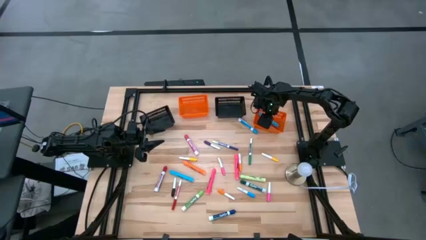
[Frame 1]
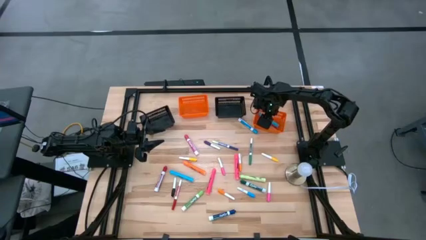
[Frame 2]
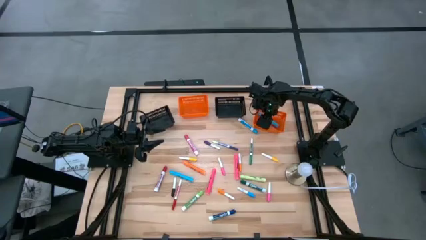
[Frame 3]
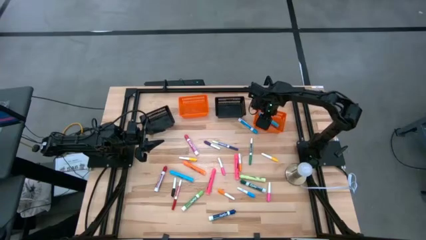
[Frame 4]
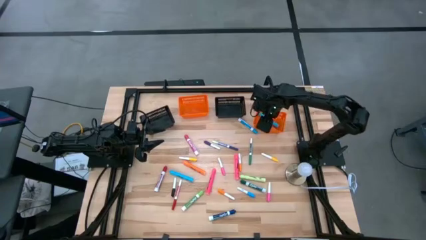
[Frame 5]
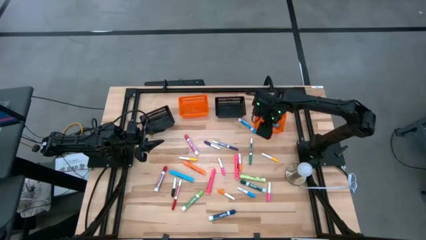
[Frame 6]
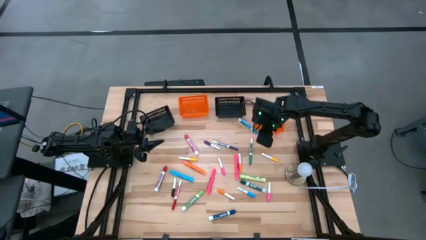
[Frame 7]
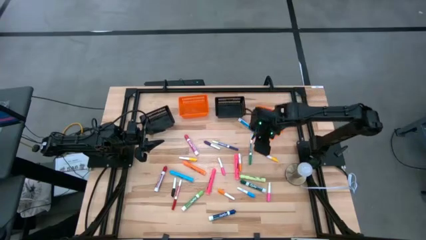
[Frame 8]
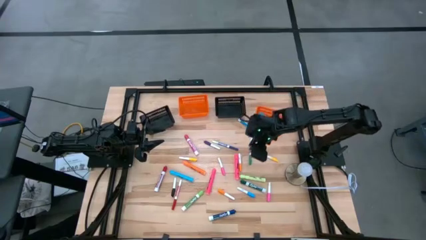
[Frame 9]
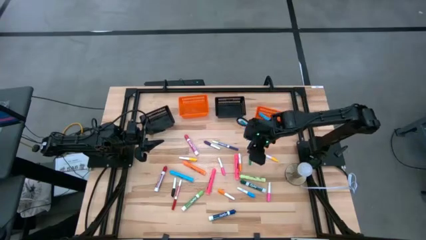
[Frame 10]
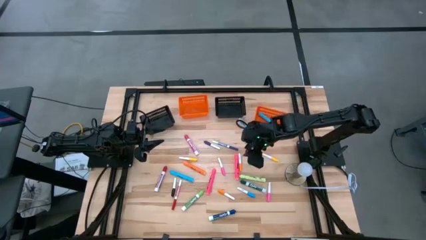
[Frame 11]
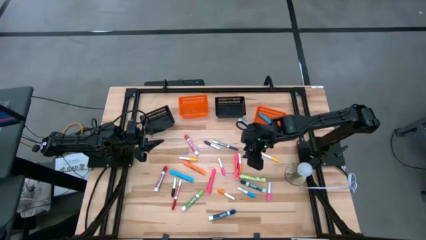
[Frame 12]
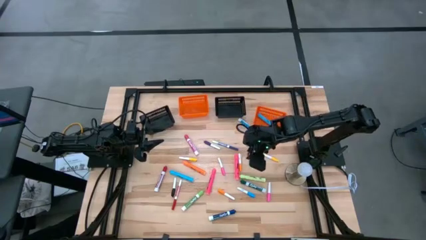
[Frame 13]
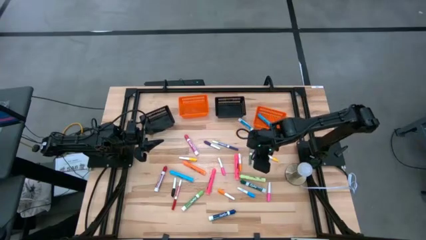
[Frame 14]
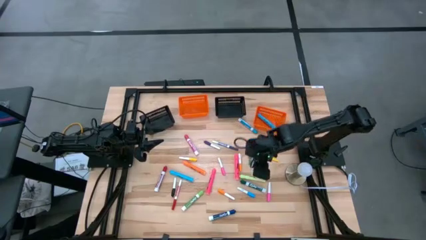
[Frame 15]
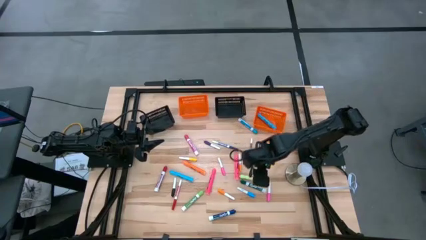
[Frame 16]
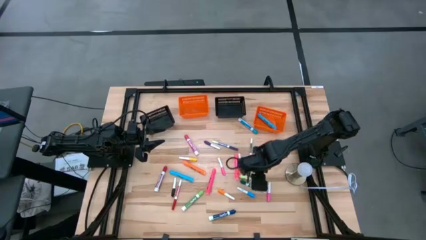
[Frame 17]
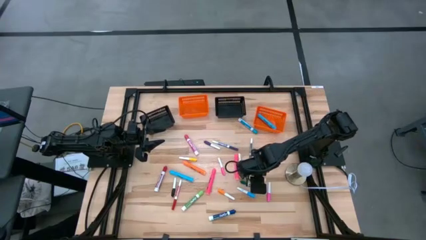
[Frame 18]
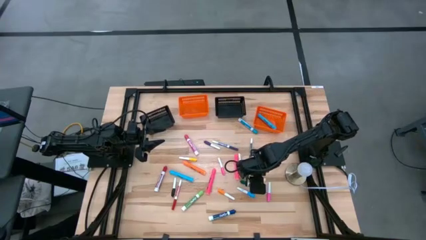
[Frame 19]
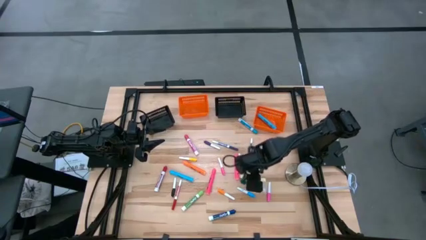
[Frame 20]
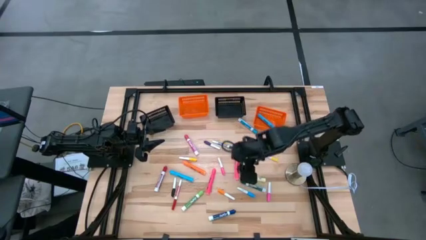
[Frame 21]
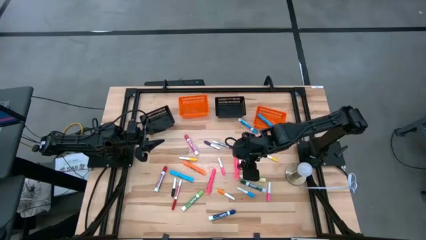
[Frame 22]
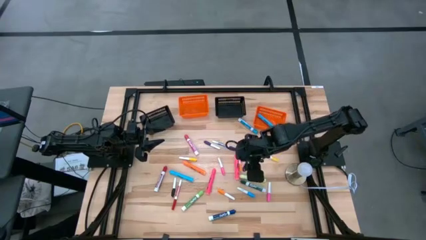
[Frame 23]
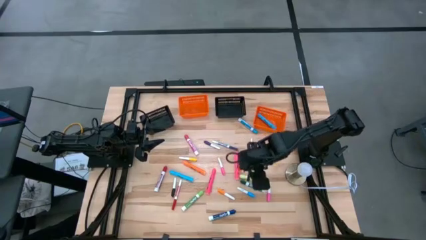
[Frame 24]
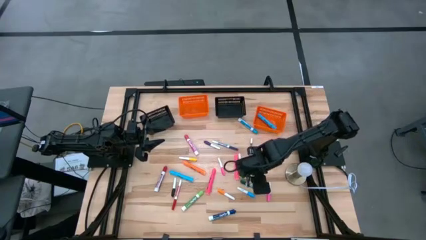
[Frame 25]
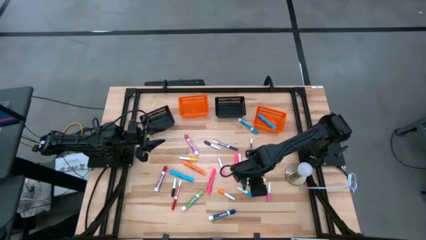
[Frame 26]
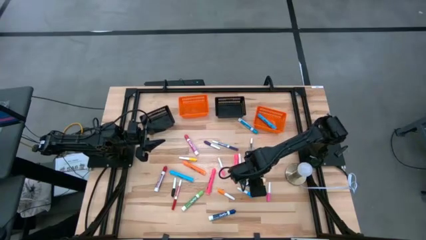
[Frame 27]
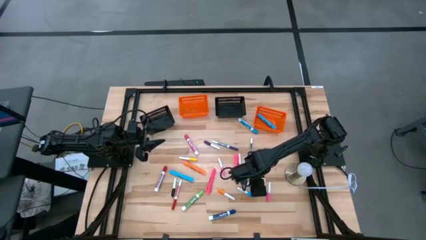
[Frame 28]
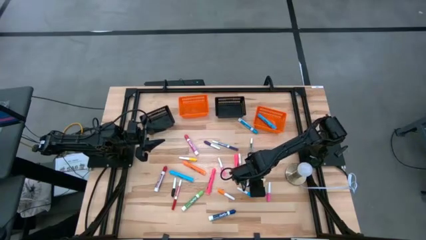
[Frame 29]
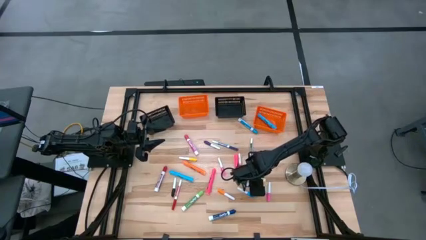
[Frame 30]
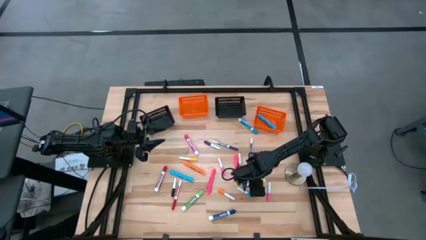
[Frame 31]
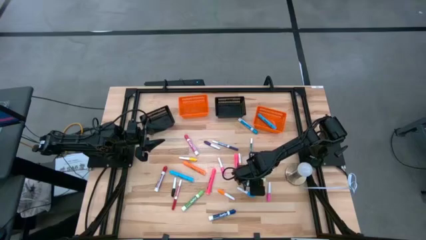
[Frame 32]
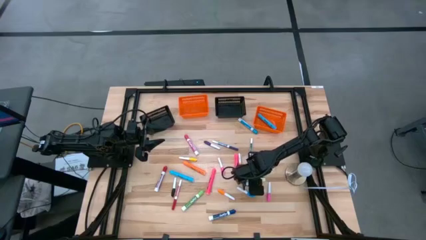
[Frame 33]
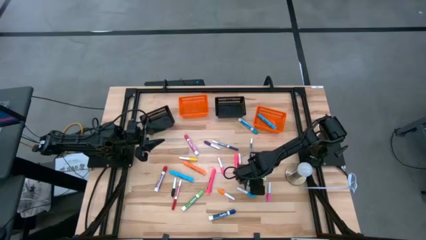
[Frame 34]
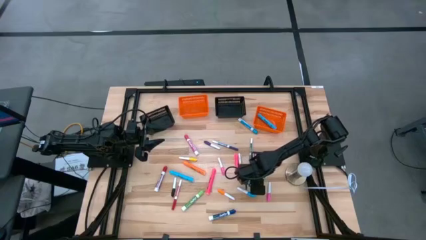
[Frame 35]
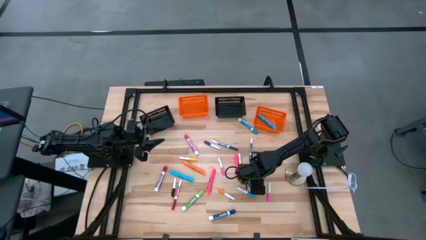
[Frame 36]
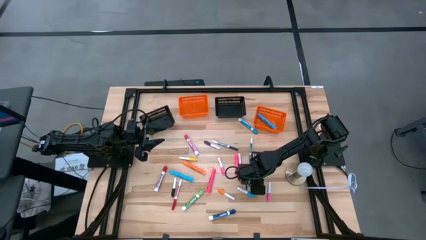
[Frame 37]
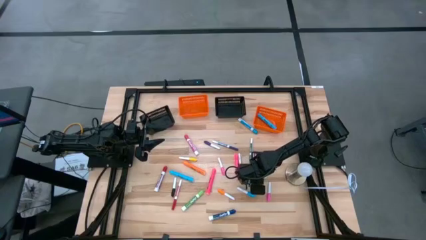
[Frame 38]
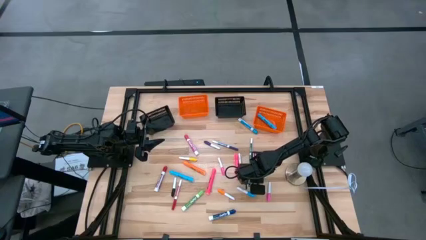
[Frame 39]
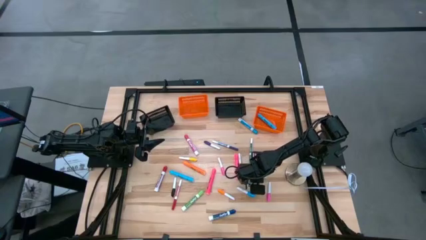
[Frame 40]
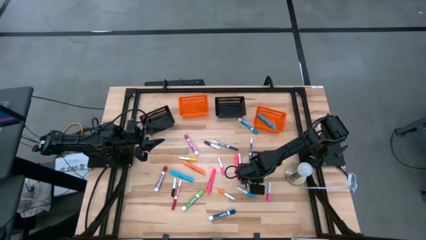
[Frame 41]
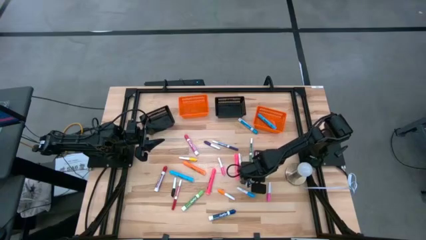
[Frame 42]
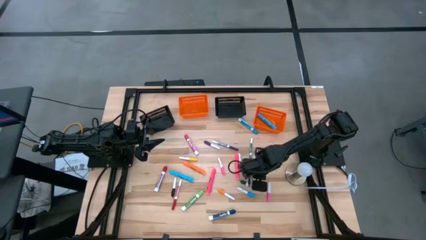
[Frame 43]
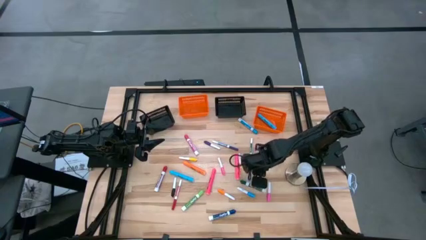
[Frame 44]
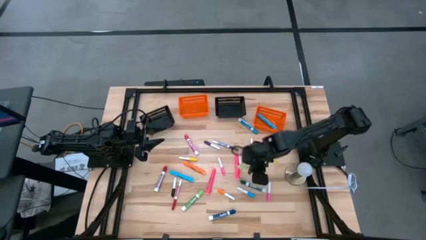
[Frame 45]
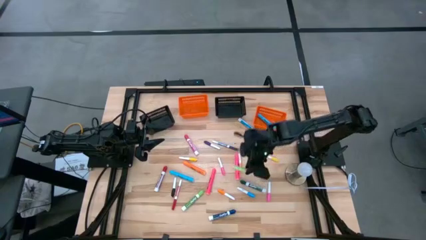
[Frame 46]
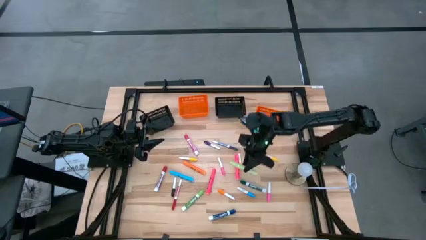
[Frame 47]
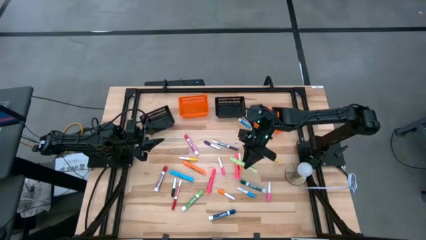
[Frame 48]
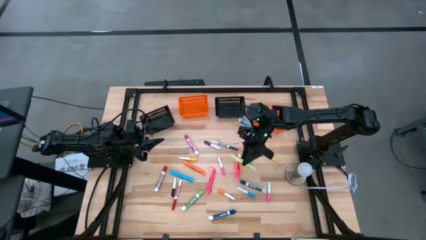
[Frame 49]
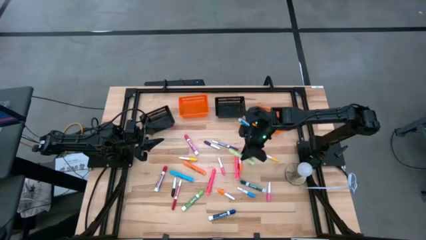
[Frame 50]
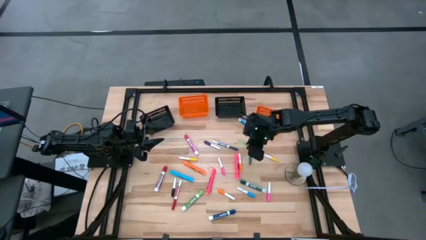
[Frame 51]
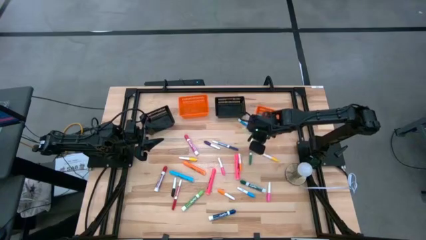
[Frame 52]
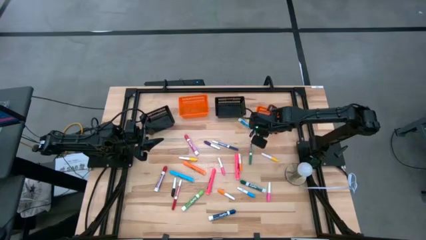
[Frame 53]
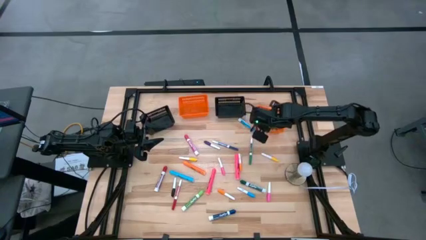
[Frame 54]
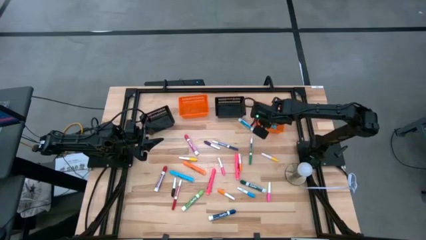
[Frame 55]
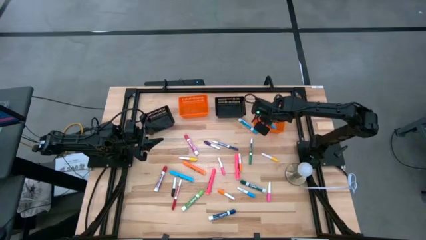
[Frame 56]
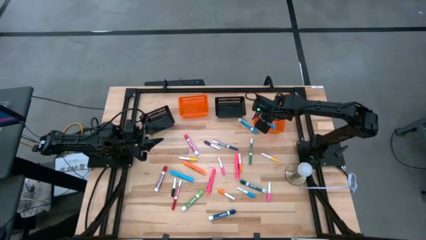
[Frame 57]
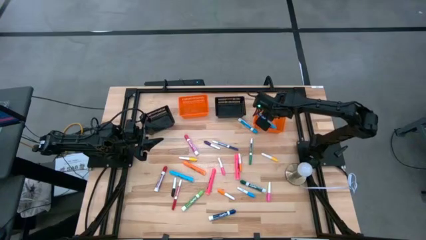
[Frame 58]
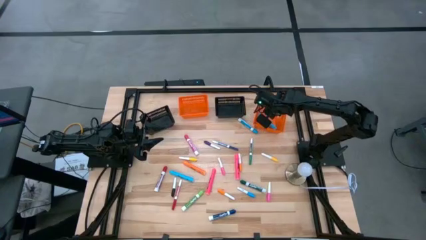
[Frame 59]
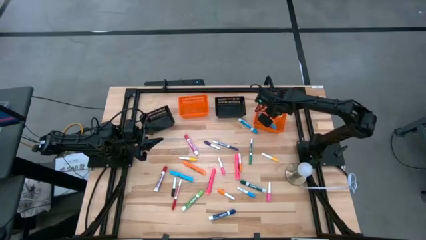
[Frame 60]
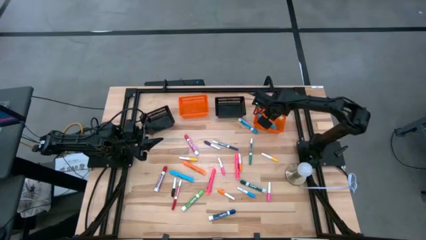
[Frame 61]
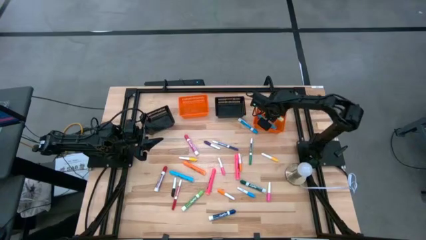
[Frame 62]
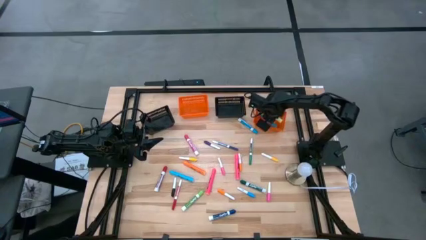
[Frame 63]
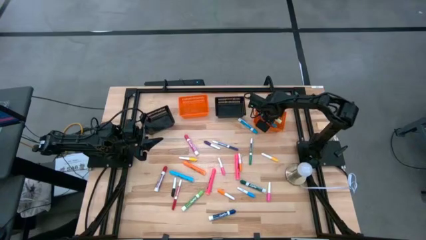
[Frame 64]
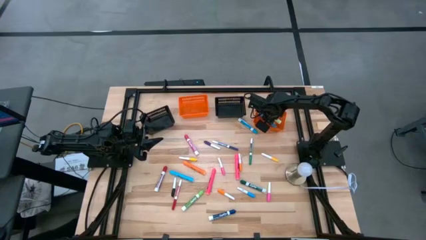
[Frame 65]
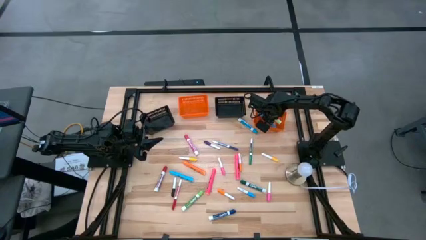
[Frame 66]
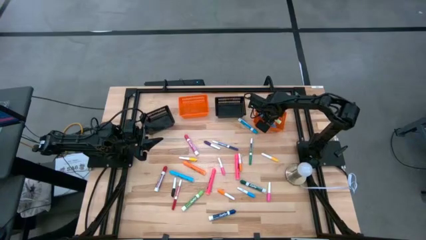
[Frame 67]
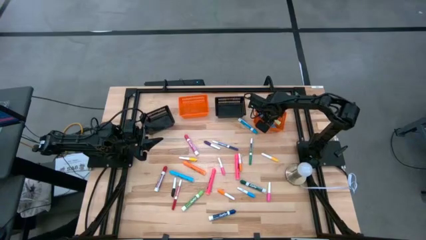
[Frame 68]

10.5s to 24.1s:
Task: Pick & Place Markers
Put the green marker into the right orange bin
